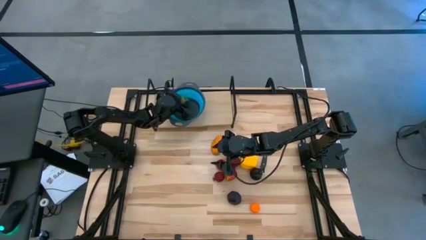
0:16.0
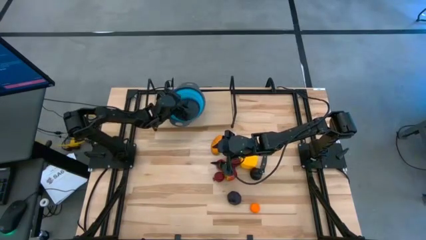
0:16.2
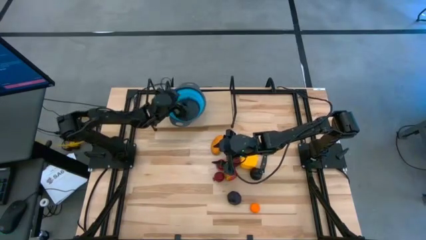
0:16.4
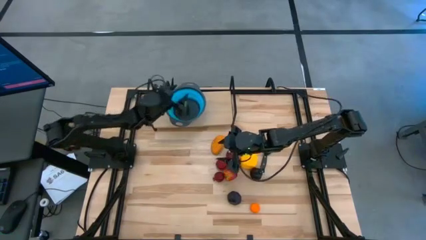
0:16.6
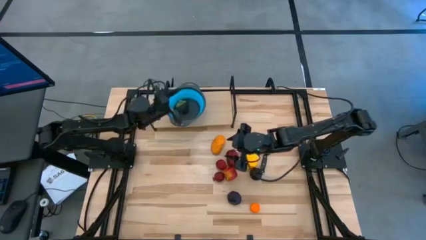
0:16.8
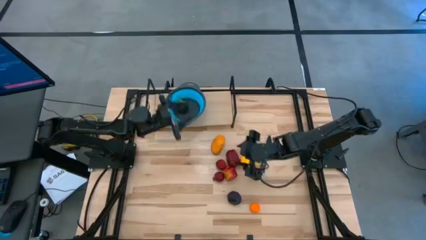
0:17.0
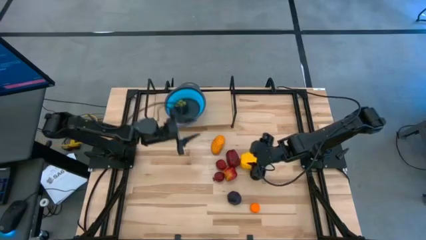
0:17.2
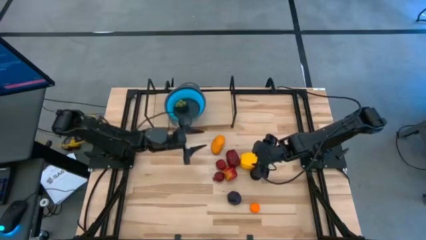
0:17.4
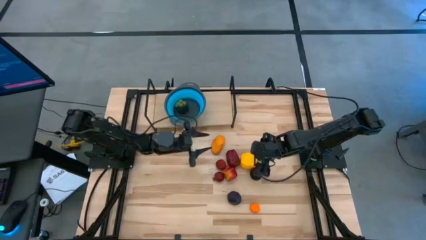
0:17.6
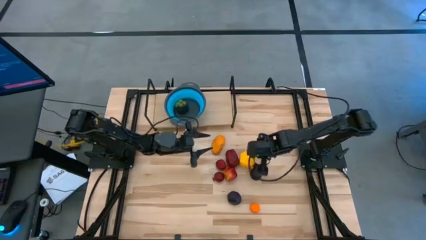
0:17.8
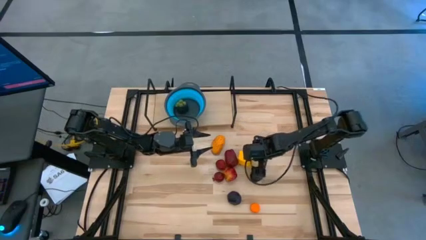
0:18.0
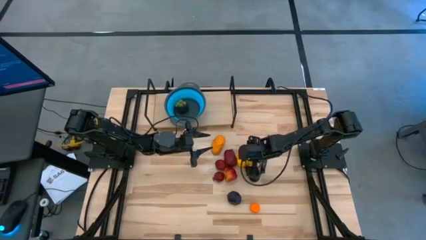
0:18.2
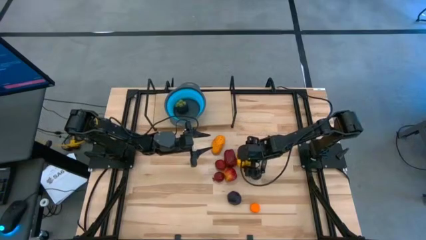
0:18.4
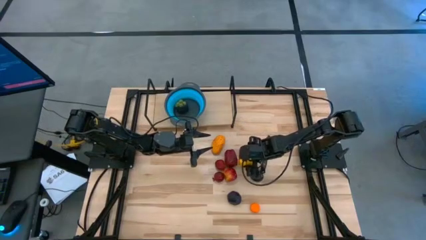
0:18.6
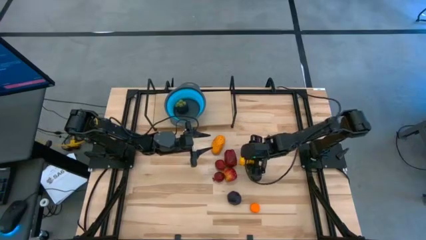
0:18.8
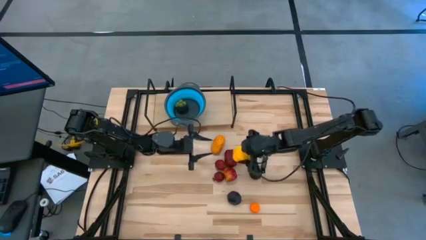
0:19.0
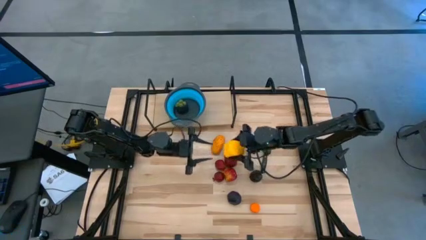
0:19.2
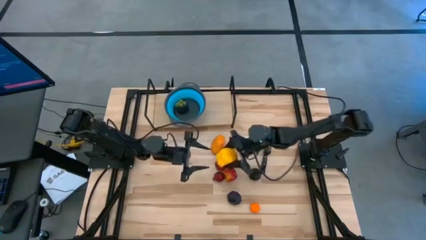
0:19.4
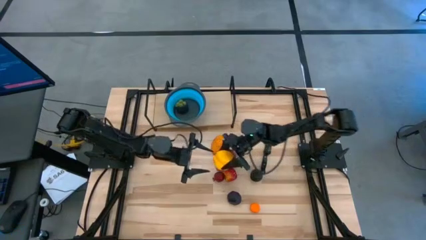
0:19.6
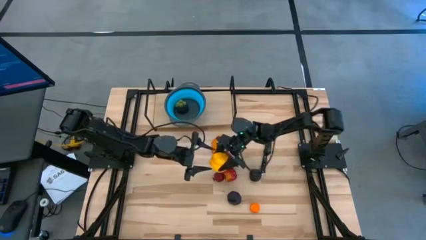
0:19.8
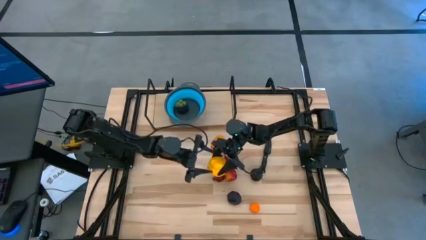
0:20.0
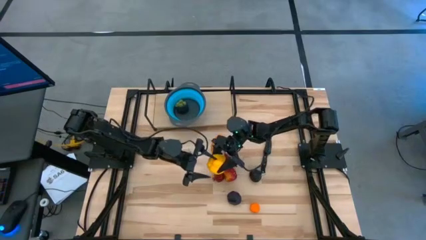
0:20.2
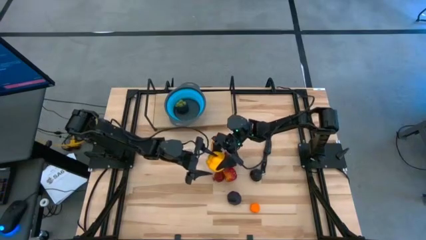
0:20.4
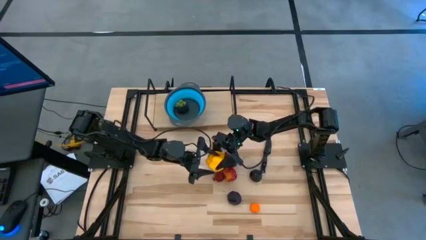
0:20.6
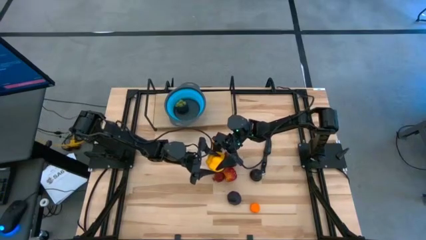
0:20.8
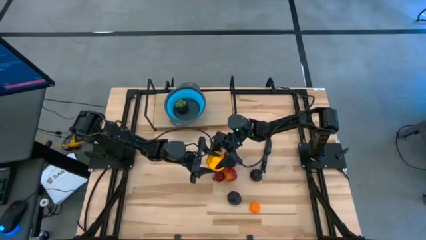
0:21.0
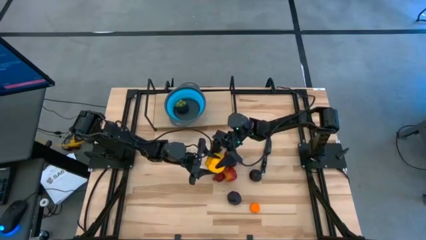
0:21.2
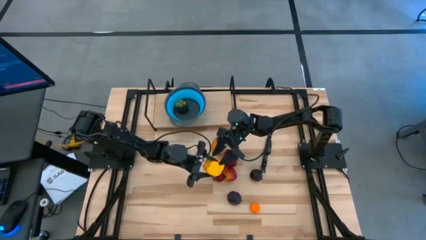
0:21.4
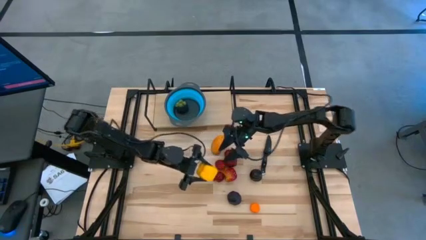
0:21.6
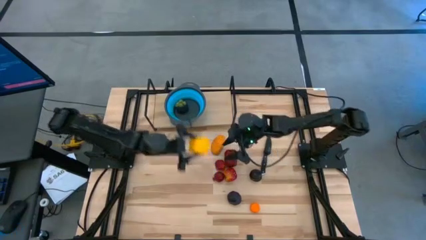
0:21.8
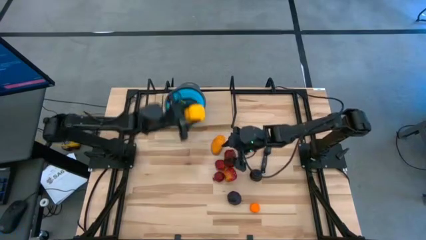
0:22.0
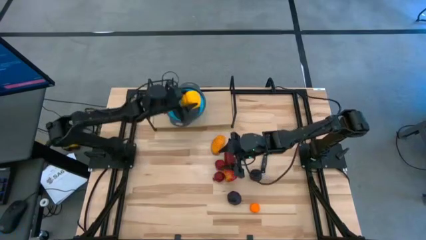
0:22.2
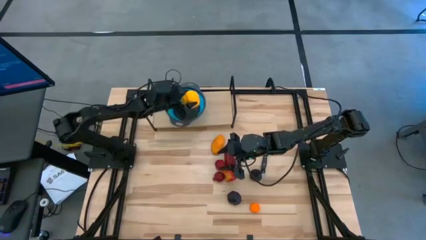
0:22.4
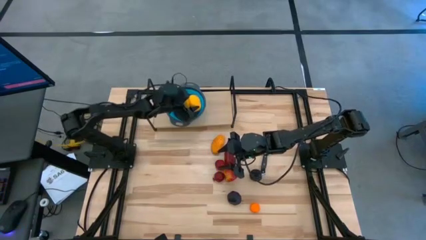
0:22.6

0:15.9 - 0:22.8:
Task: Pick & Place Fruit
Put the bell pepper into the blue strainer bowl on the shelf

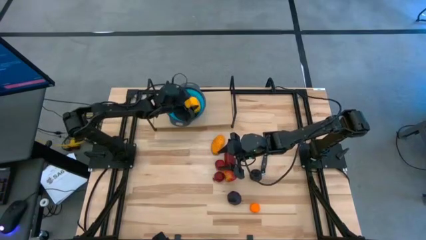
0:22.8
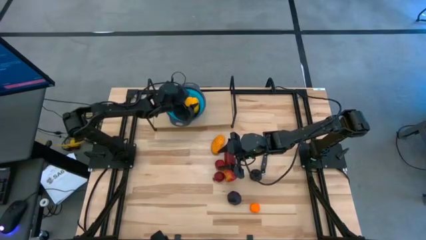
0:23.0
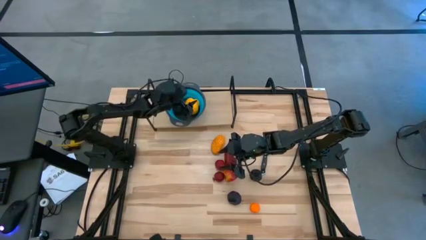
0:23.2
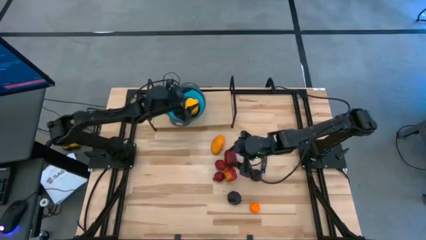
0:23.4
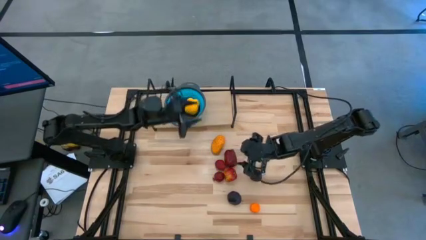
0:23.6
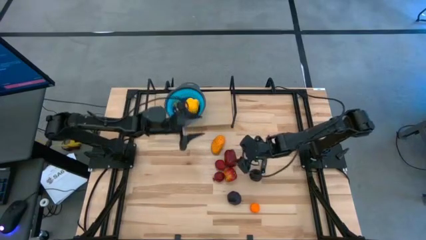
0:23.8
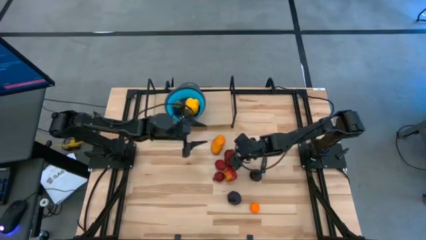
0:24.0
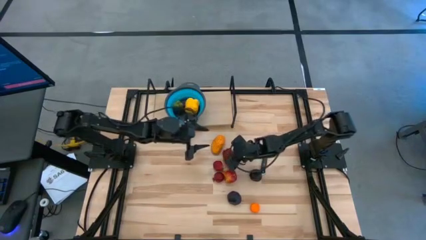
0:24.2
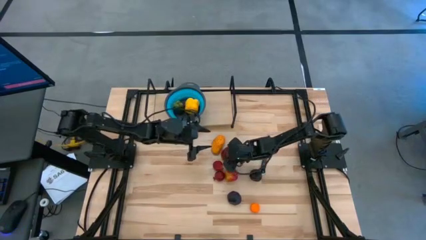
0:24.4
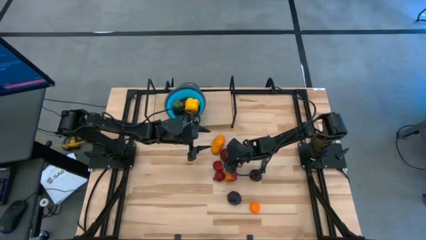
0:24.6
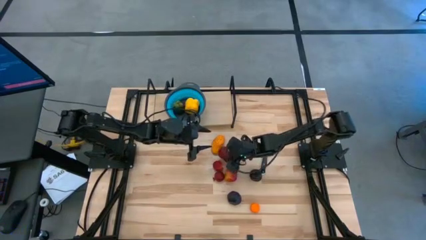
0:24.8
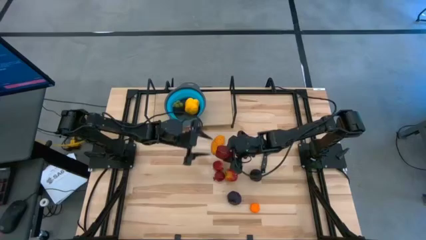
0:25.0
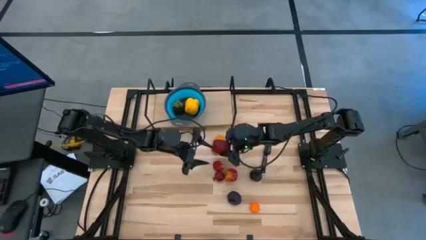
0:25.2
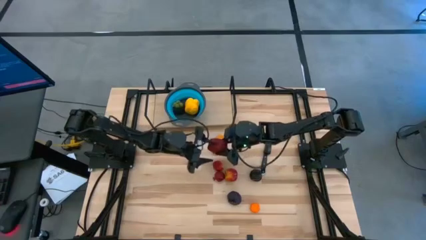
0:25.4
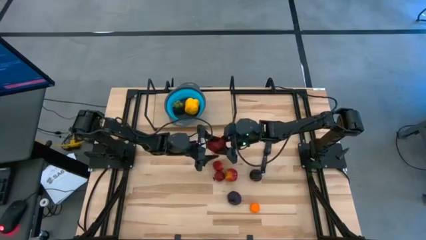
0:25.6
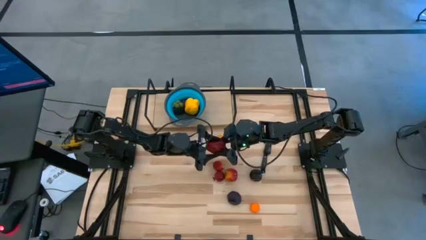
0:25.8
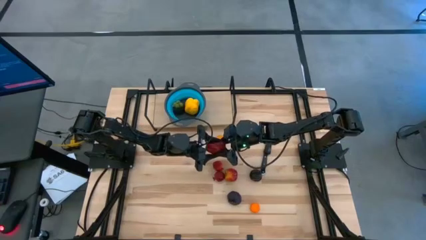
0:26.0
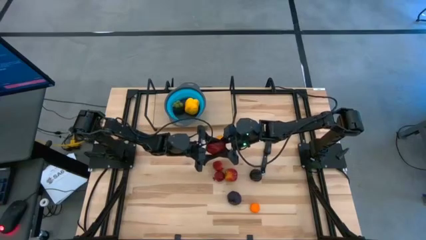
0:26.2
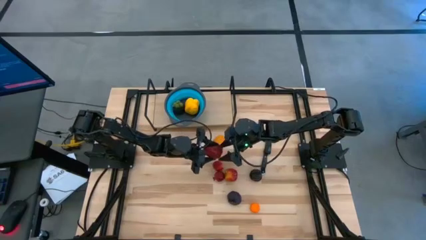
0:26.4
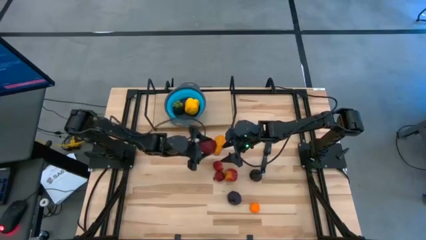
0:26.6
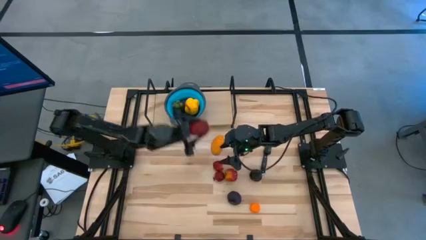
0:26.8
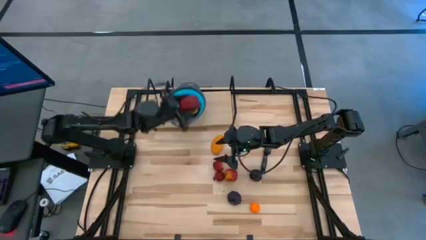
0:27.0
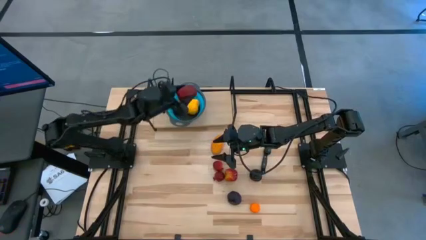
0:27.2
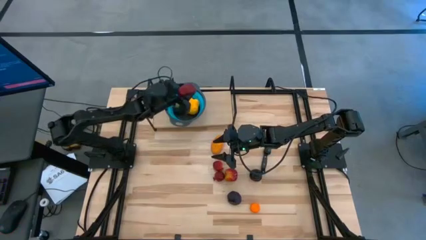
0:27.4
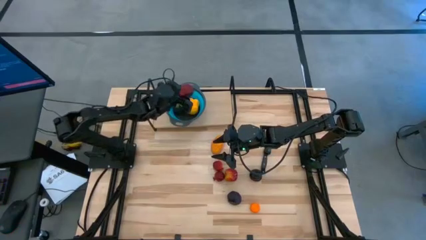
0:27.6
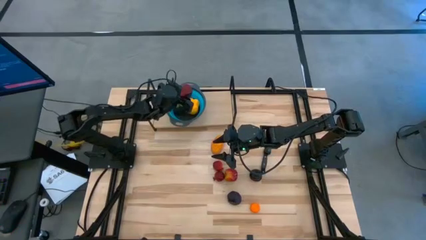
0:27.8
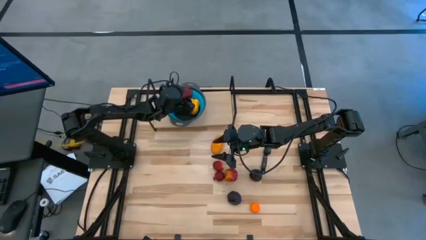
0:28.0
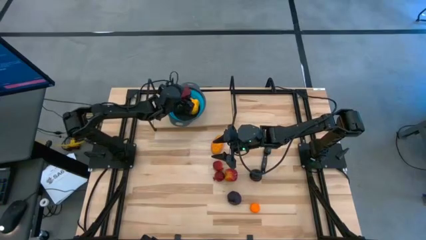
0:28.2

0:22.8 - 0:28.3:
Put the apple into the blue strainer bowl on the shelf

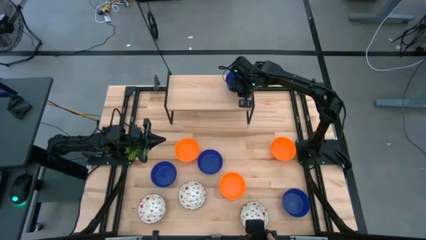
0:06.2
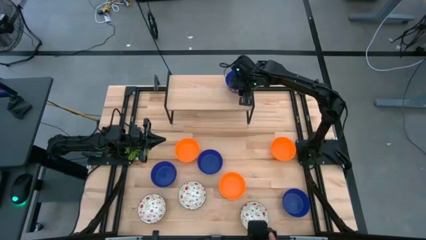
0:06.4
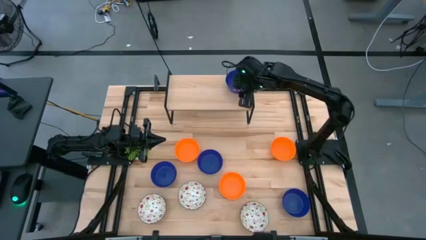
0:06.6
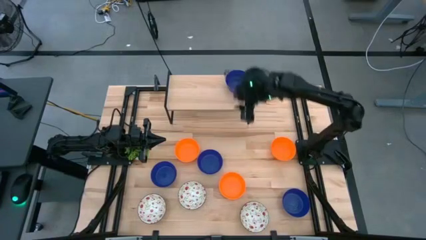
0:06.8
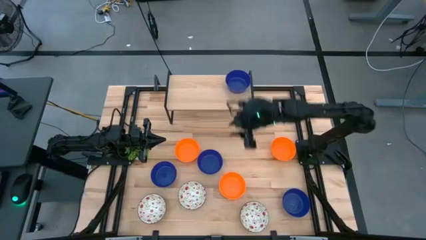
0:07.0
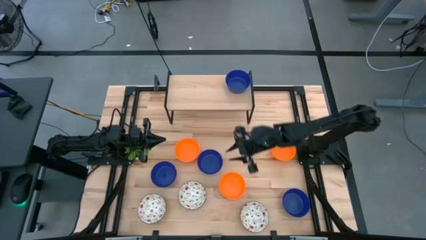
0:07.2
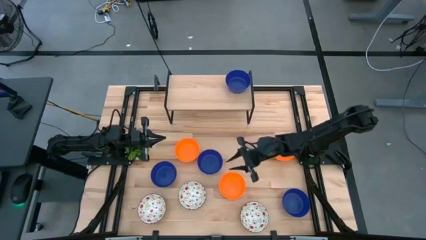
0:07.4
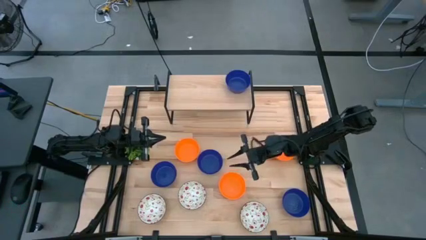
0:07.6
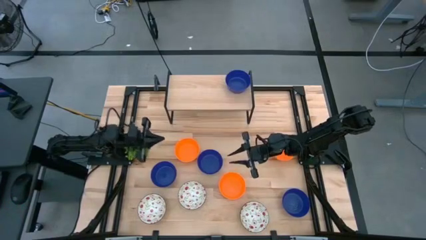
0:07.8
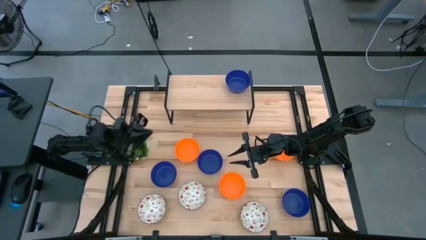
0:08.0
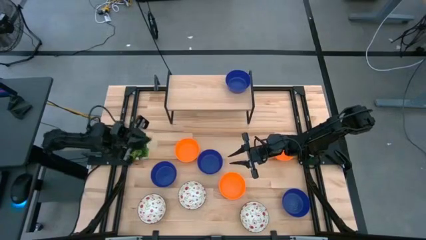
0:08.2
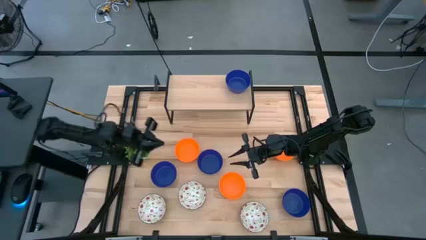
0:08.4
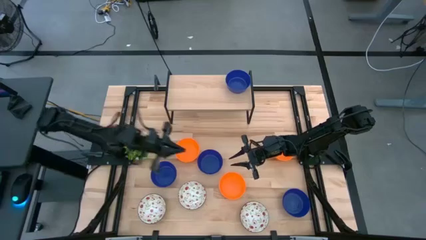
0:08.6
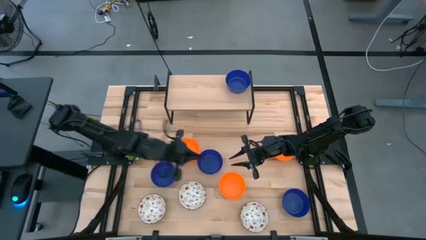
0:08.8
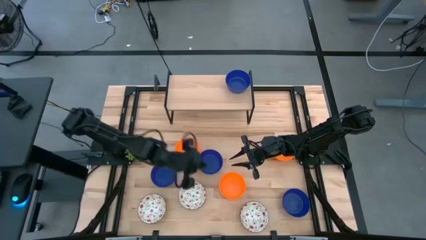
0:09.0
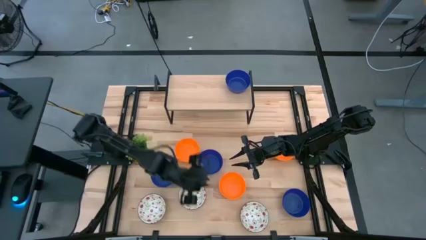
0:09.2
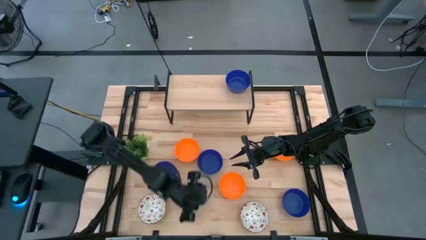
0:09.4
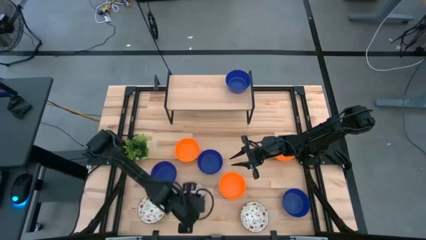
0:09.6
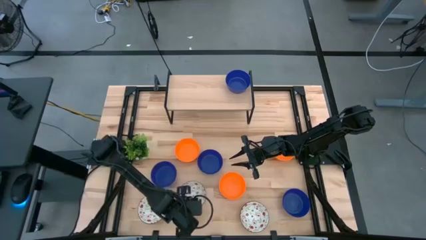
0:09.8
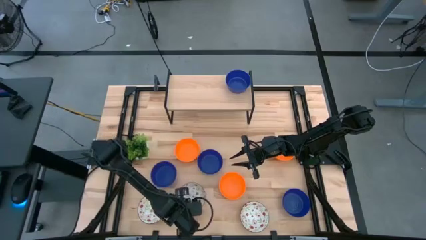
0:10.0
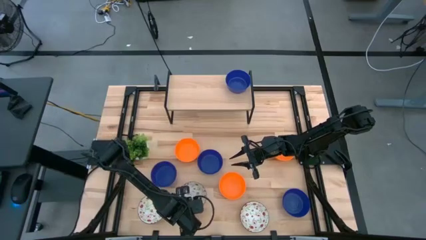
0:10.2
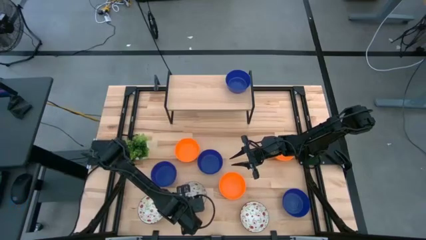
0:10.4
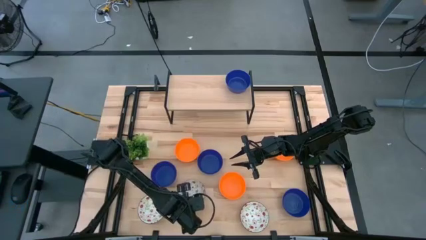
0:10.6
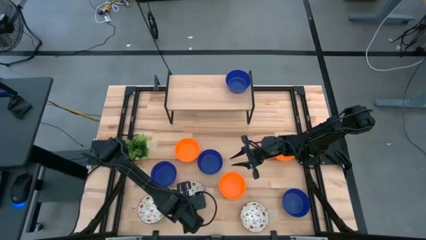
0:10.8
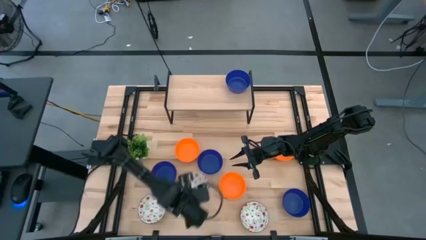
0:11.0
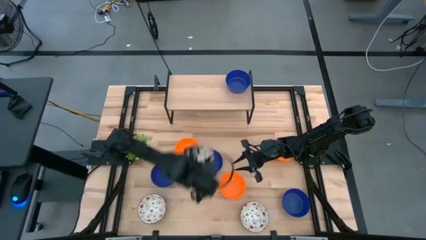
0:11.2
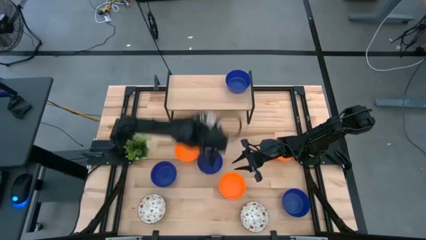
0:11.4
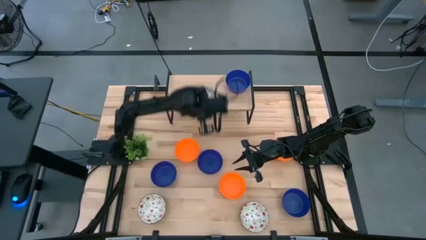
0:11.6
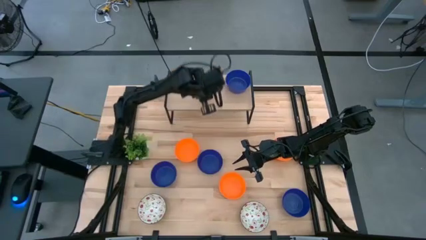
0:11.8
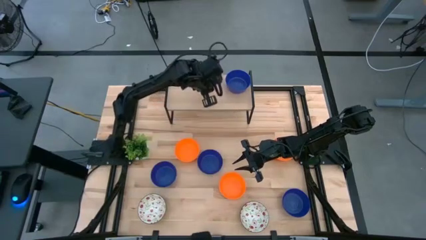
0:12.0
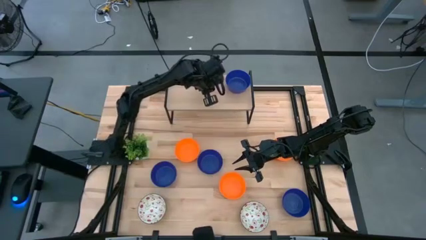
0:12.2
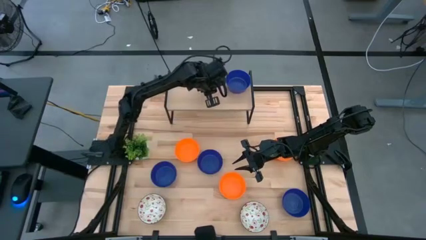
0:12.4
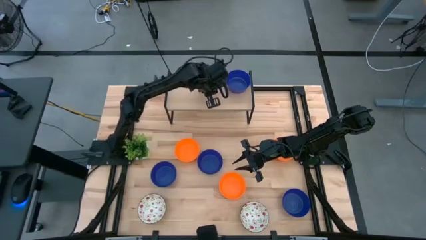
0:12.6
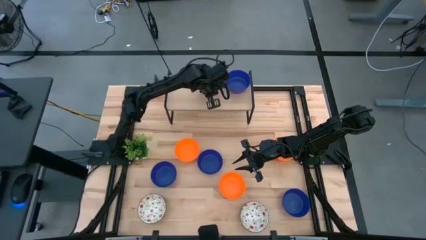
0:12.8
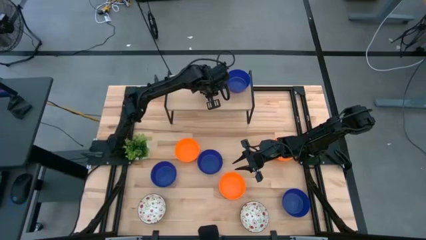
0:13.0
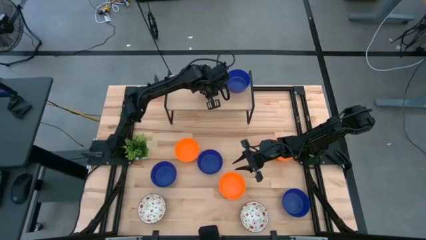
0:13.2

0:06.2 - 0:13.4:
Task: Pick & Place Mini bowls
Put the green patterned bowl on the shelf
